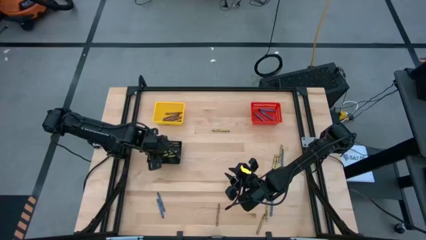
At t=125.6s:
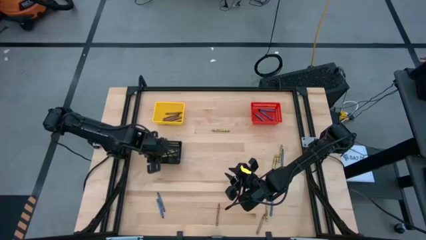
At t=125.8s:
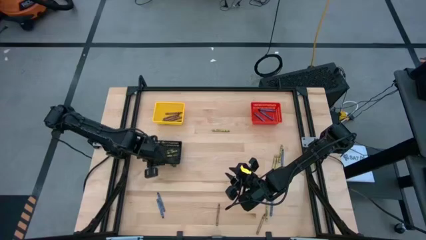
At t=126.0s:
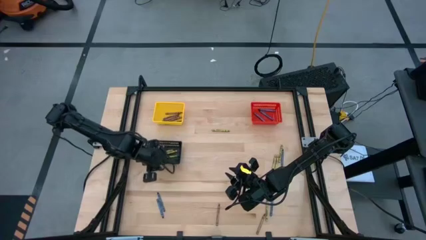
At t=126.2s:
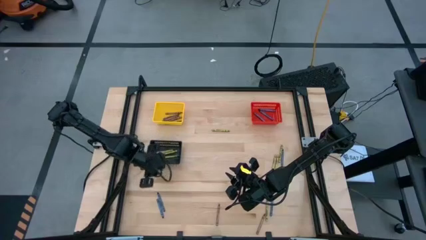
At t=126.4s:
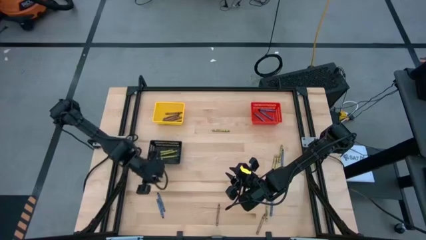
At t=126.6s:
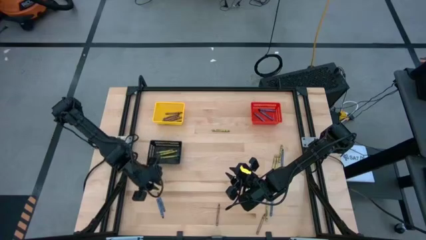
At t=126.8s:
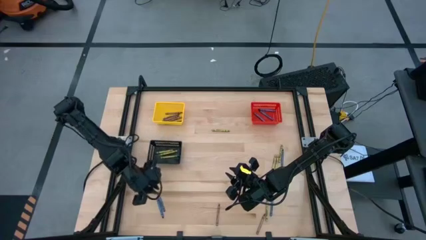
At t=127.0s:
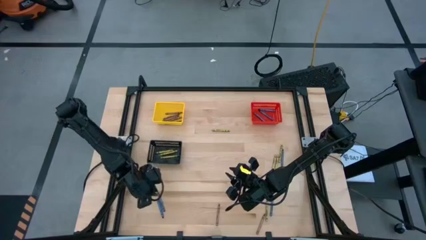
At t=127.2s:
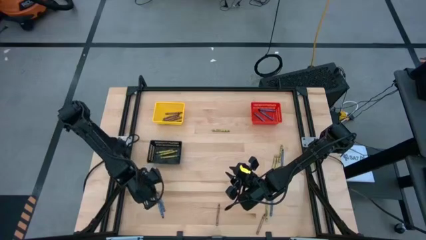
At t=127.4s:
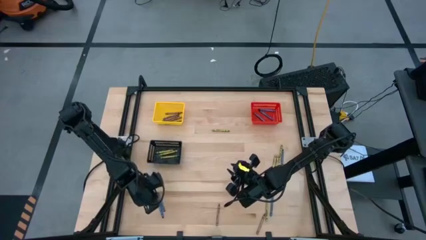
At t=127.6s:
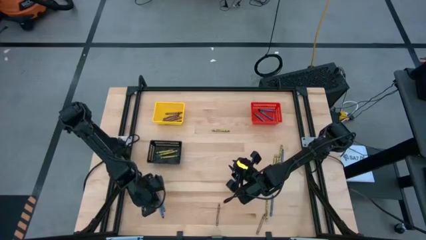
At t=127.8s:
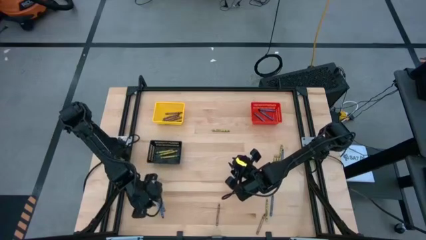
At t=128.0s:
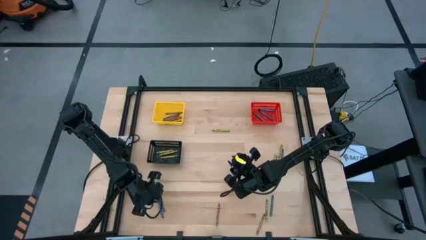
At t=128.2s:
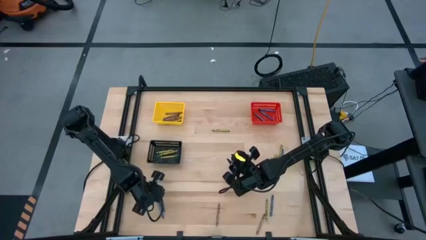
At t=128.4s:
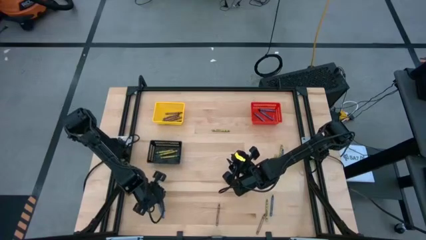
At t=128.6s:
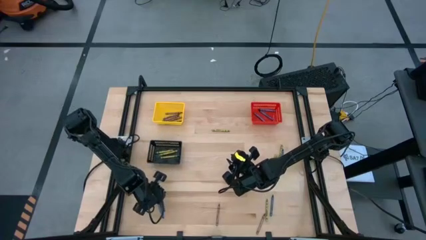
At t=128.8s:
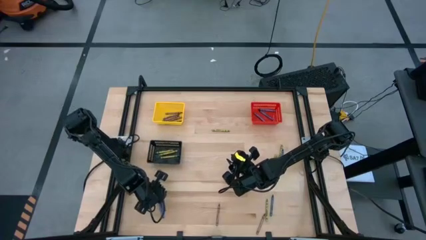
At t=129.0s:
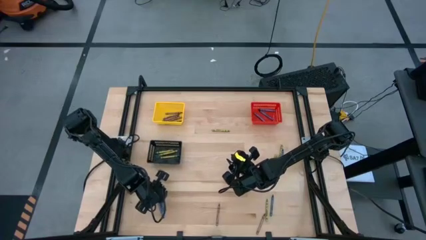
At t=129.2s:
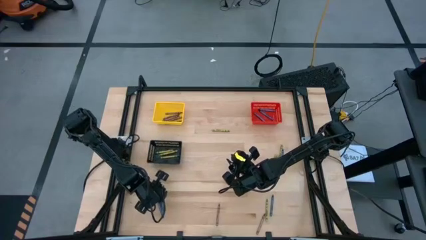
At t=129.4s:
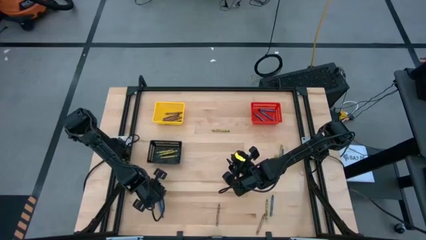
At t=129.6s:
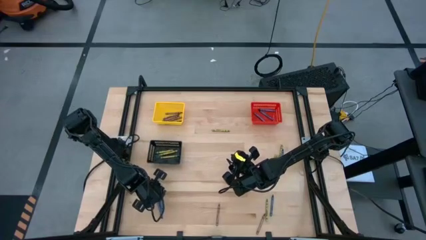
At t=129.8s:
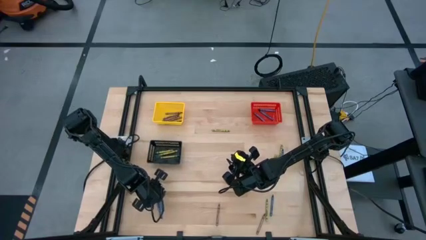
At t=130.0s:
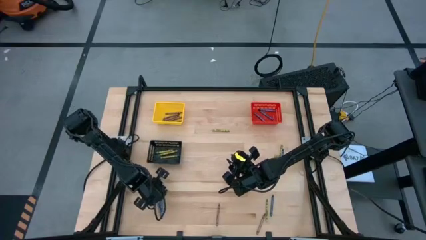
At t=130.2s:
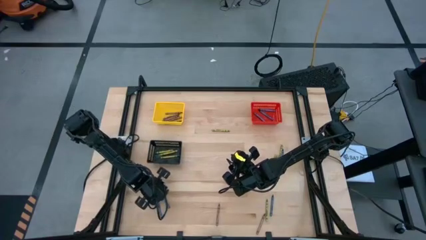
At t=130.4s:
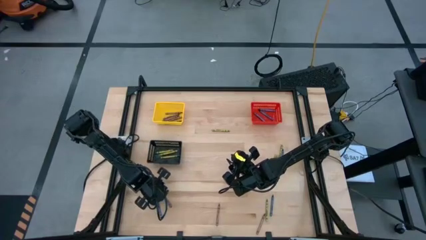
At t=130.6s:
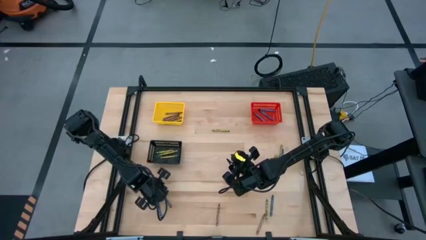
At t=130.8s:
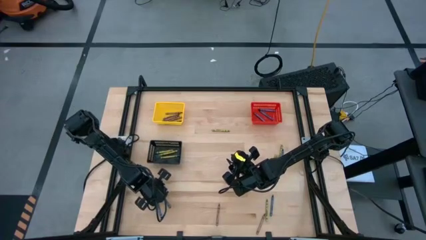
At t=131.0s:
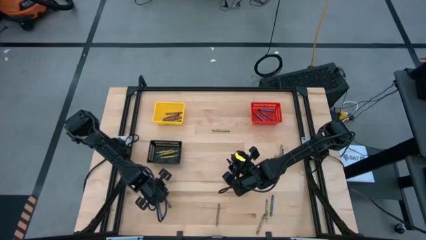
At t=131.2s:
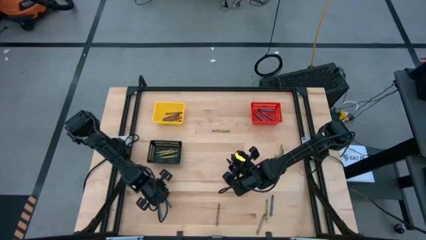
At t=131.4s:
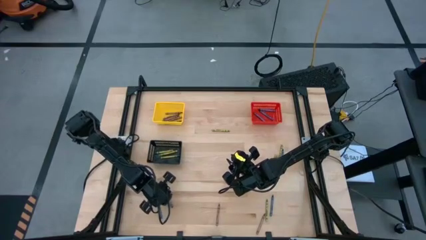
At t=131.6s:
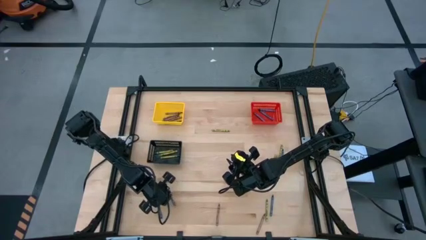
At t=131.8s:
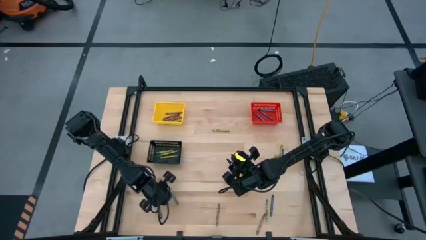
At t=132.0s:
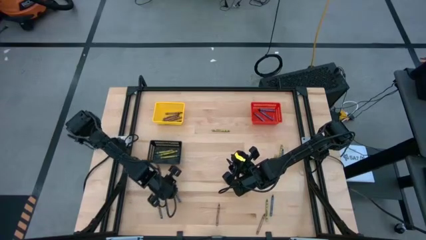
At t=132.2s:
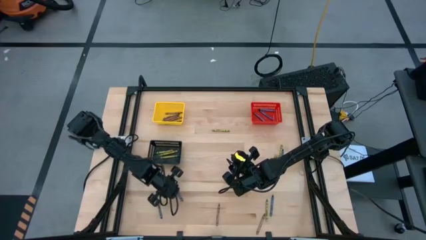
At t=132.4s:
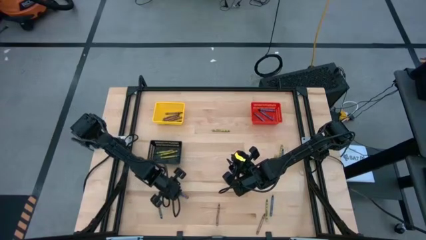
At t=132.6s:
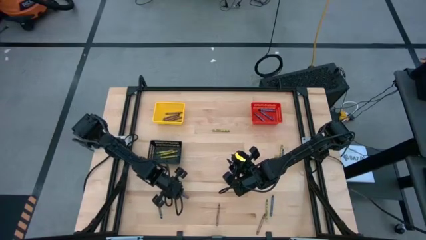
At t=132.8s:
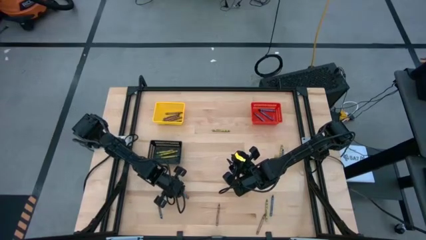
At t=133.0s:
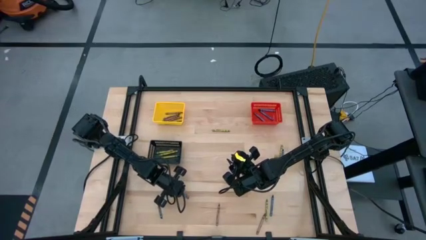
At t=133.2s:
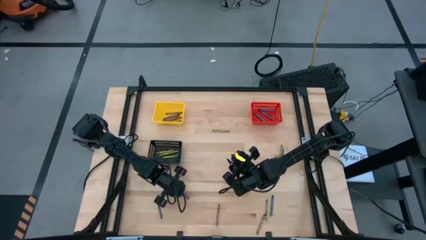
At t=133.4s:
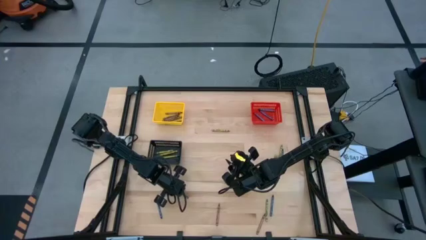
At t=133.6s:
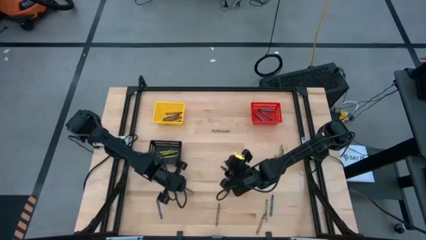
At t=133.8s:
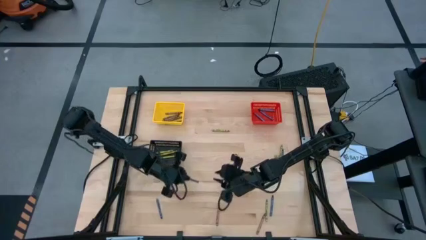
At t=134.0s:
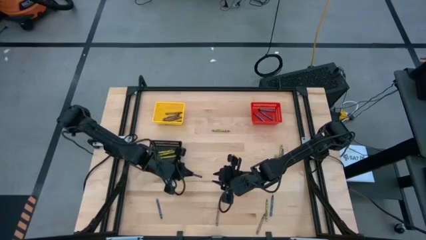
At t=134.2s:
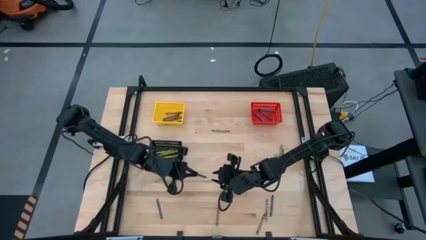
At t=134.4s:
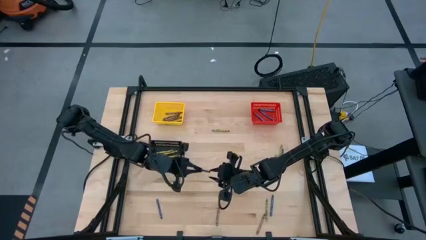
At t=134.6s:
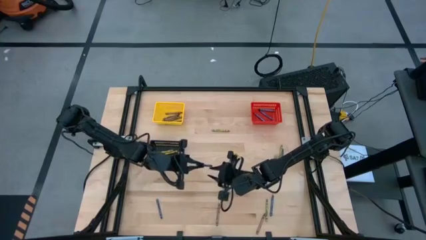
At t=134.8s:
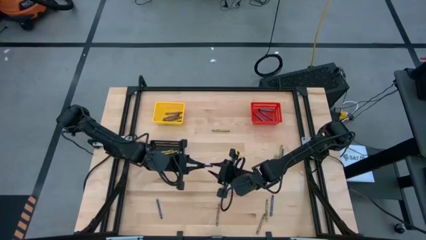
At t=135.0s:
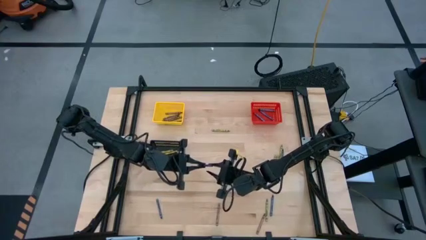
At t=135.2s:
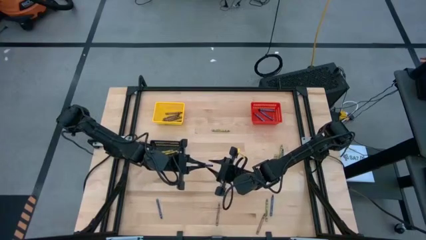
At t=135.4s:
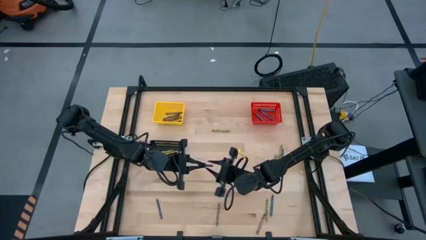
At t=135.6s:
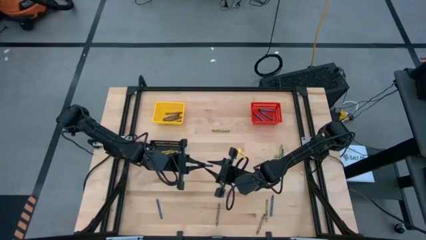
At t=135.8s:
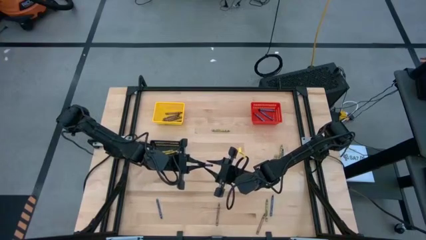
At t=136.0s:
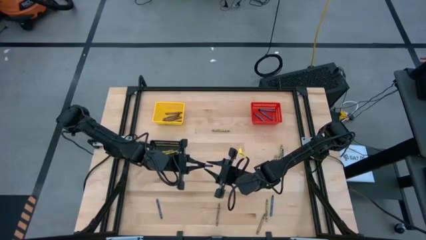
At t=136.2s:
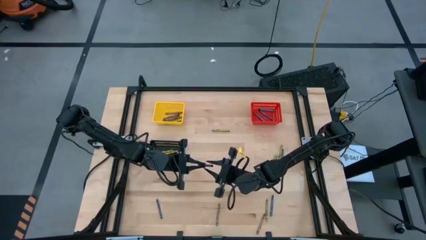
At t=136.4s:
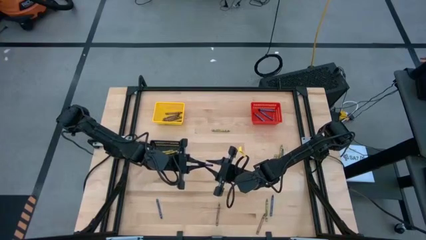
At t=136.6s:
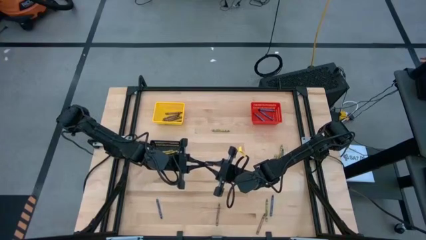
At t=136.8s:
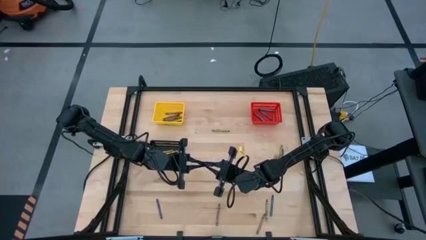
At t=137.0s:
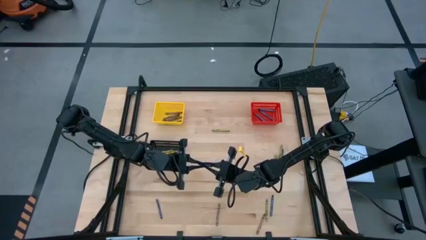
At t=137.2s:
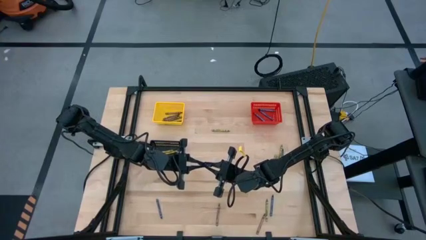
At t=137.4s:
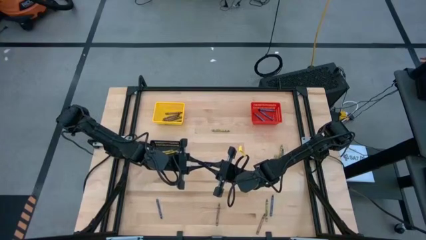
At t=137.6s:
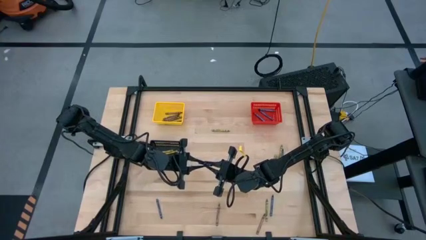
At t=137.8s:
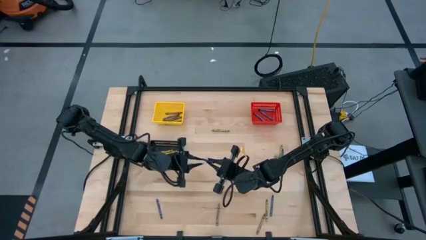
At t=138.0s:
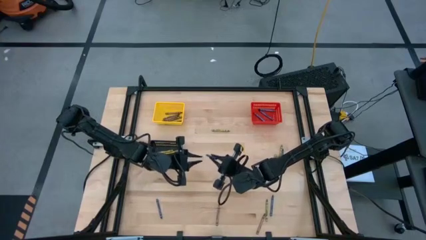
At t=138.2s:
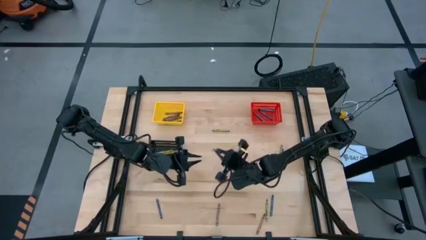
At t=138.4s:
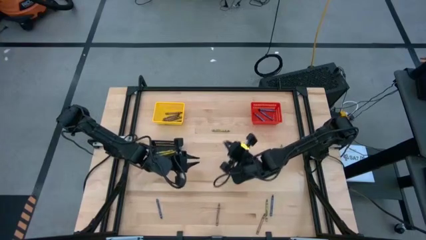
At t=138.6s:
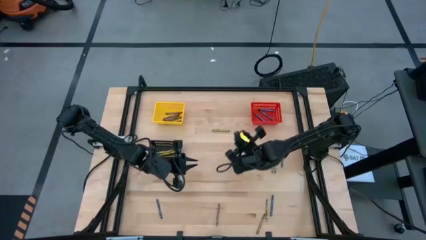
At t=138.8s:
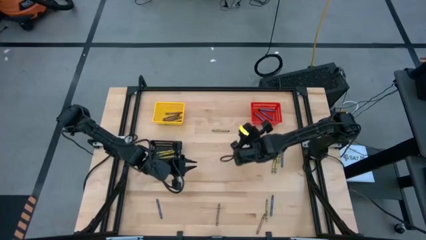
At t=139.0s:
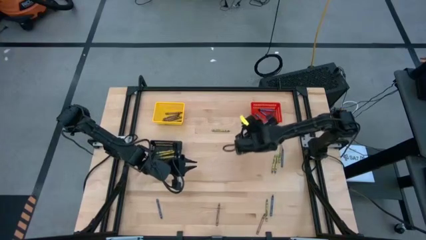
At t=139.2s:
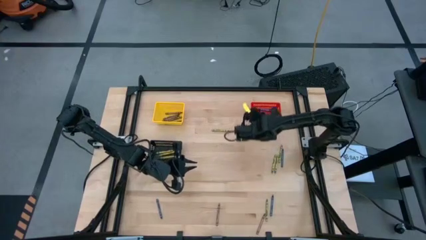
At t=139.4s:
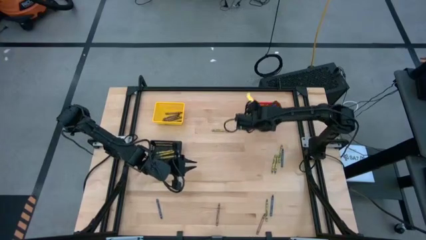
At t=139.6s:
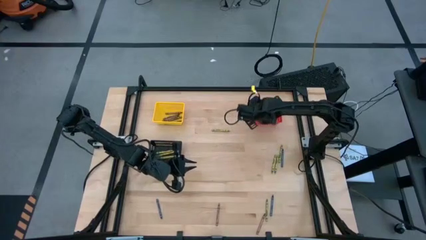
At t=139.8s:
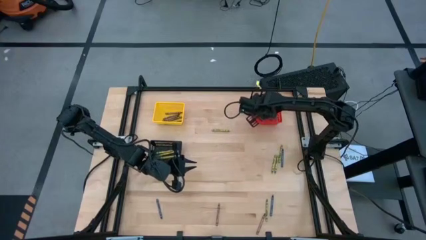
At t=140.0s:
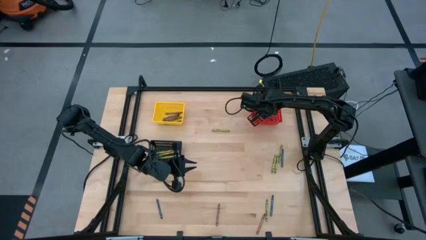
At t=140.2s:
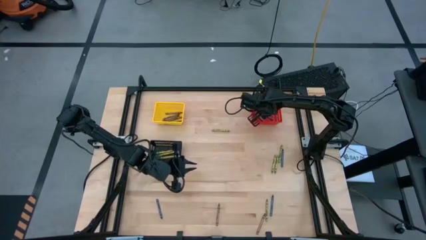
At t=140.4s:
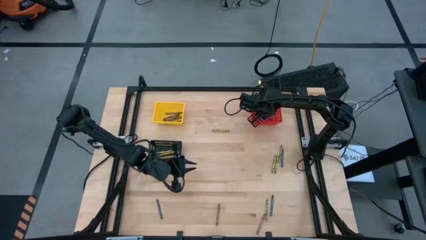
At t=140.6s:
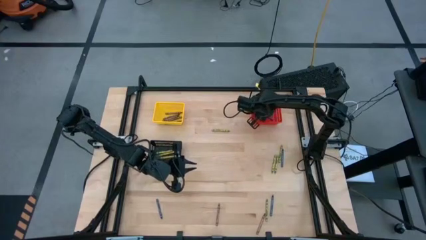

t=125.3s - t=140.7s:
Task: Sort crayons
Put the blue crayon into the red bin
